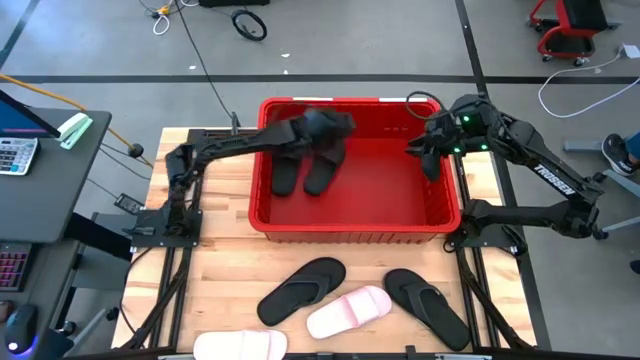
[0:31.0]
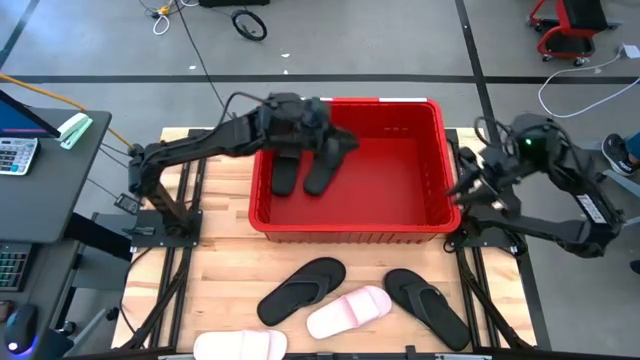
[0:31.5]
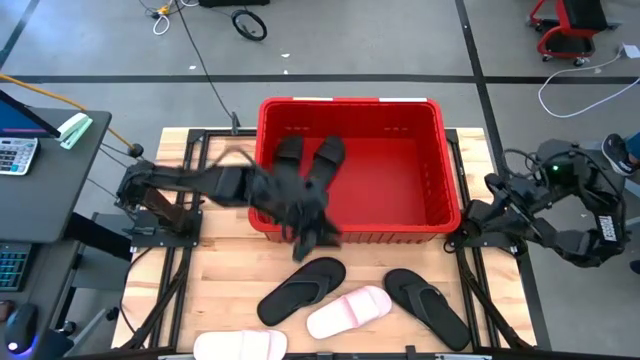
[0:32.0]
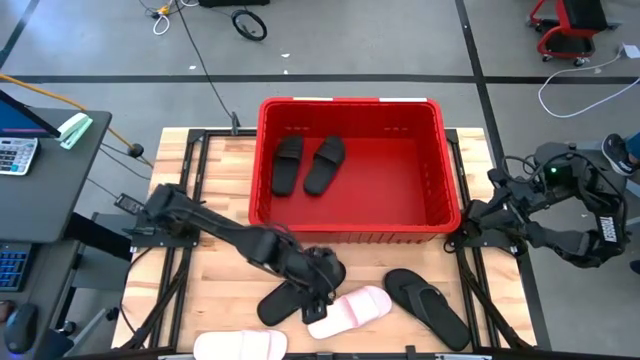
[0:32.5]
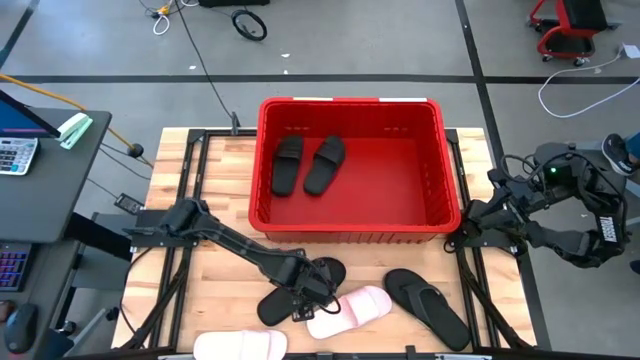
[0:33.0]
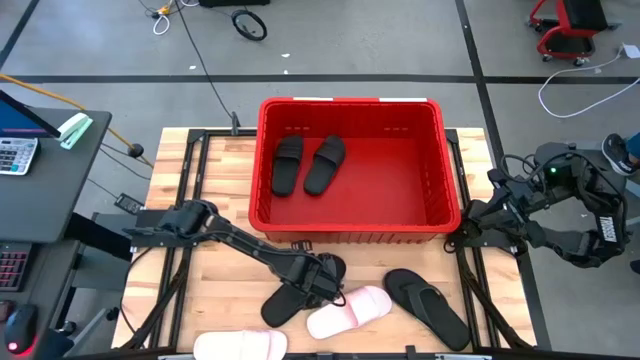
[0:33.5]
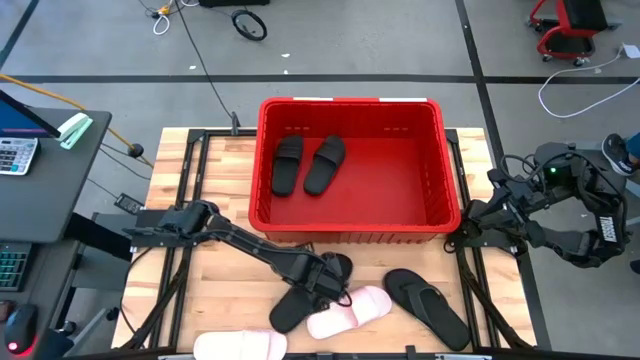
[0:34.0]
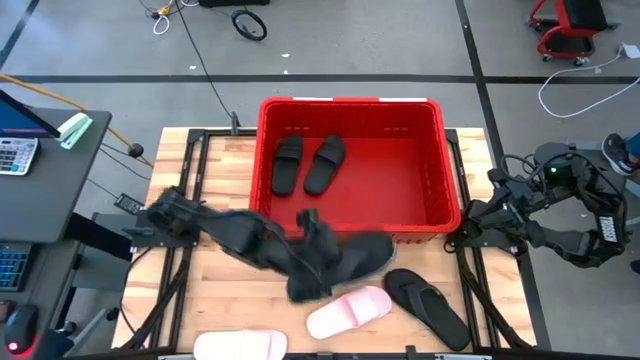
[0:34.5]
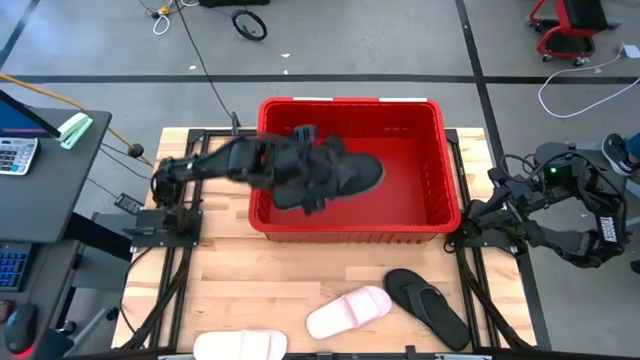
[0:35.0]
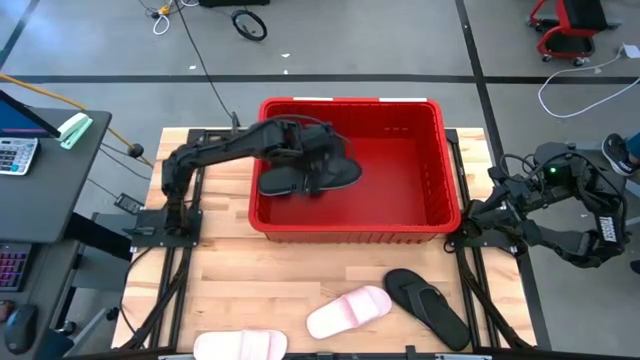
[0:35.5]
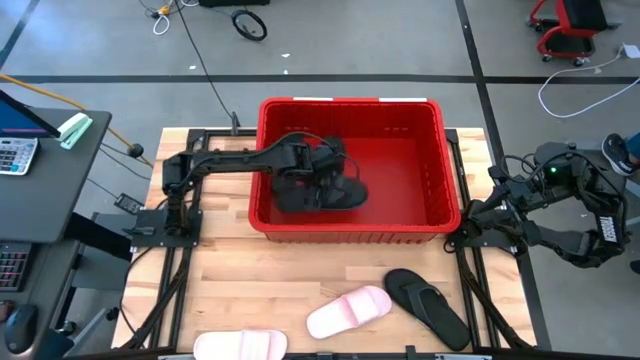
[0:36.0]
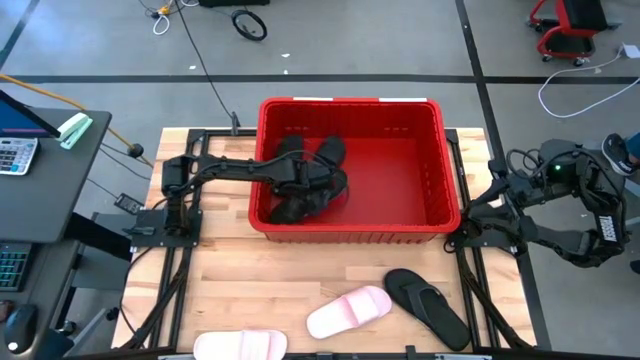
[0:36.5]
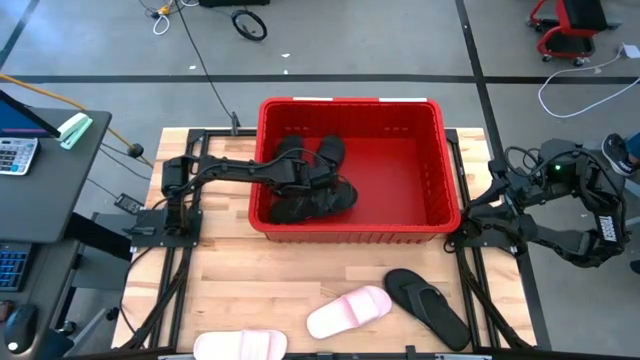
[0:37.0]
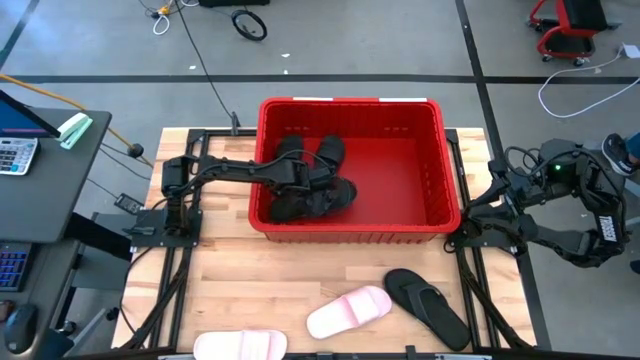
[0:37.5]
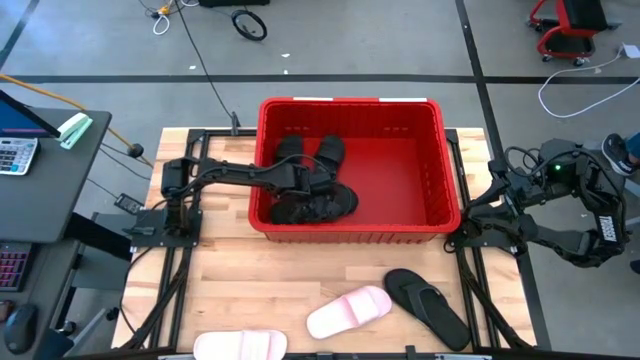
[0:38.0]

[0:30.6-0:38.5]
Task: Pick and place slides into bin
Put the left black slipper into the red bin

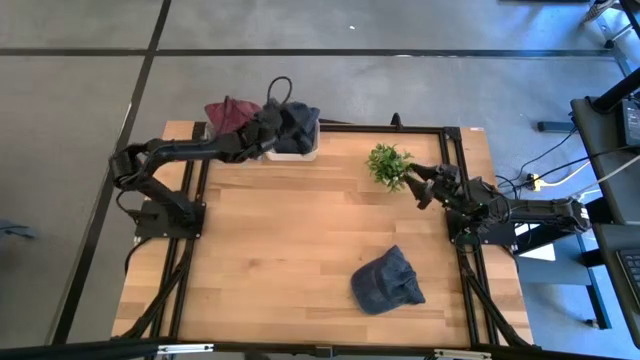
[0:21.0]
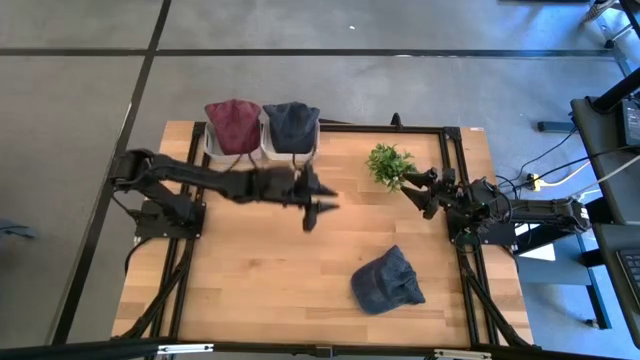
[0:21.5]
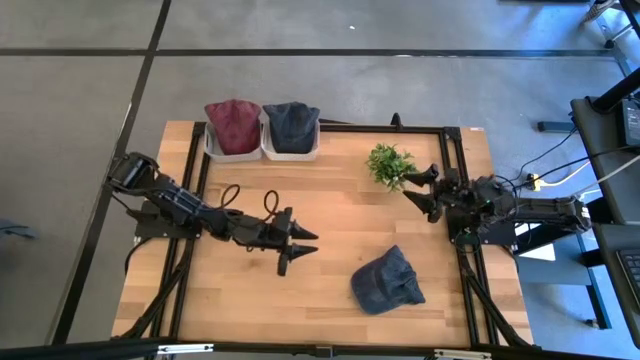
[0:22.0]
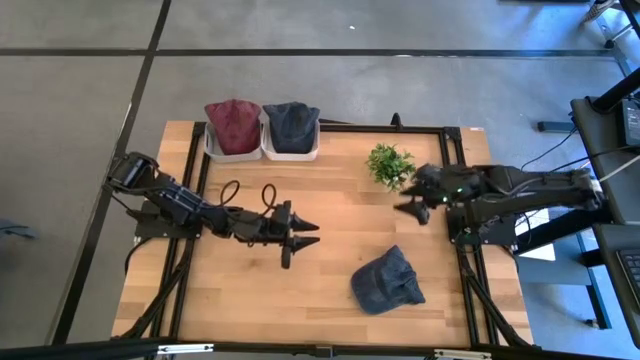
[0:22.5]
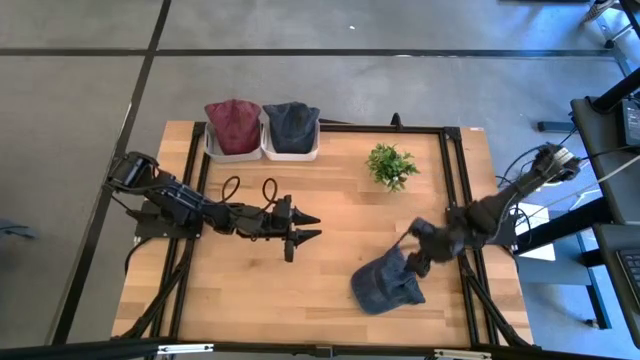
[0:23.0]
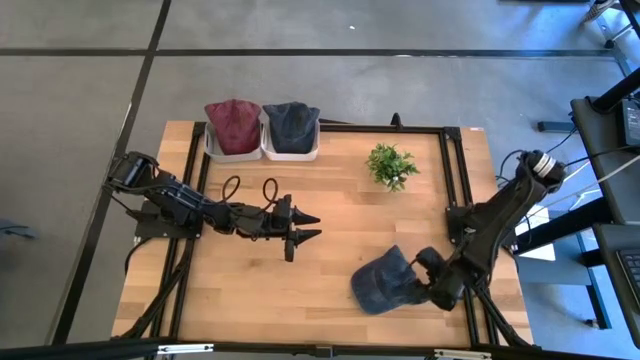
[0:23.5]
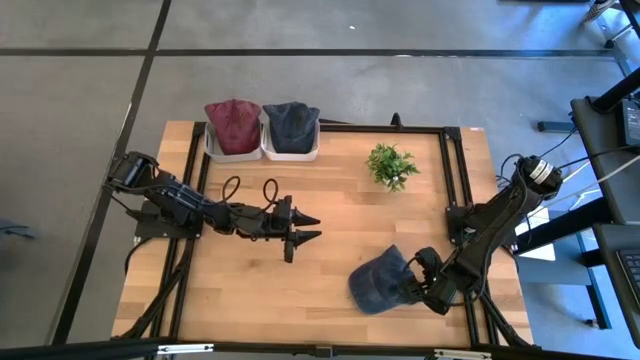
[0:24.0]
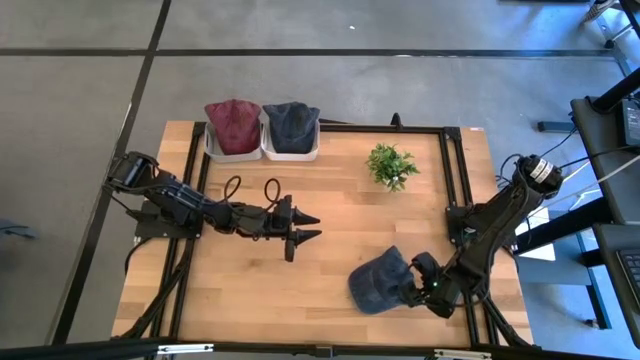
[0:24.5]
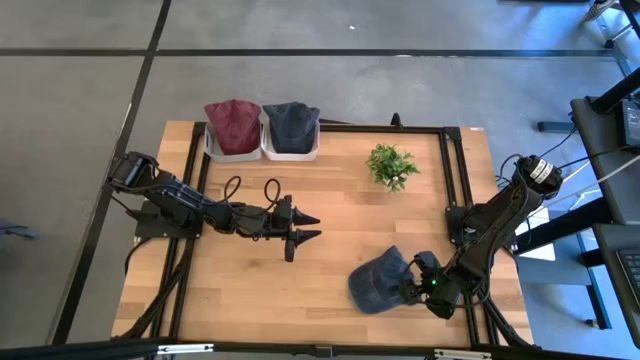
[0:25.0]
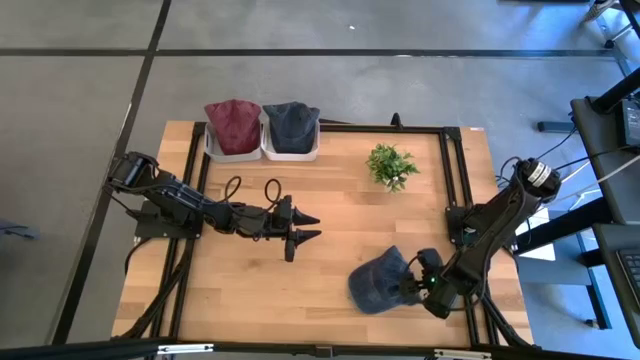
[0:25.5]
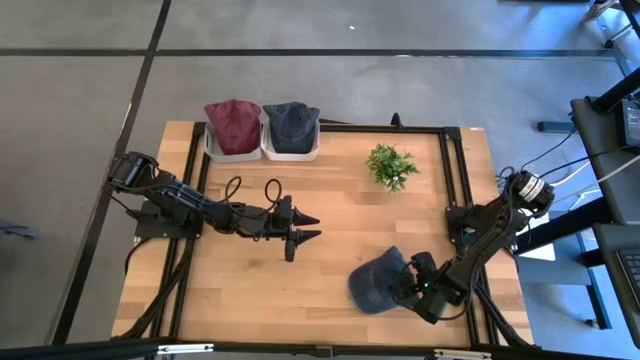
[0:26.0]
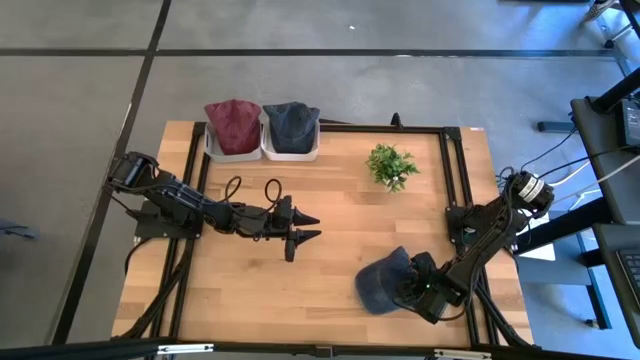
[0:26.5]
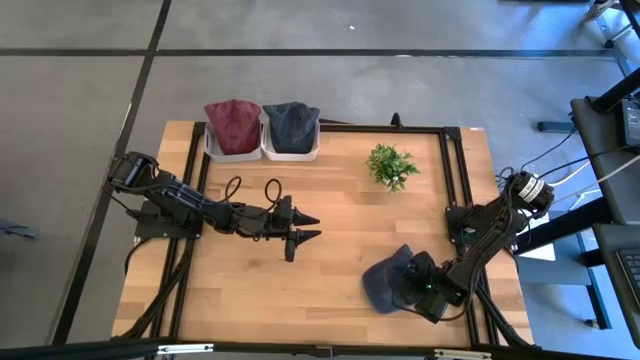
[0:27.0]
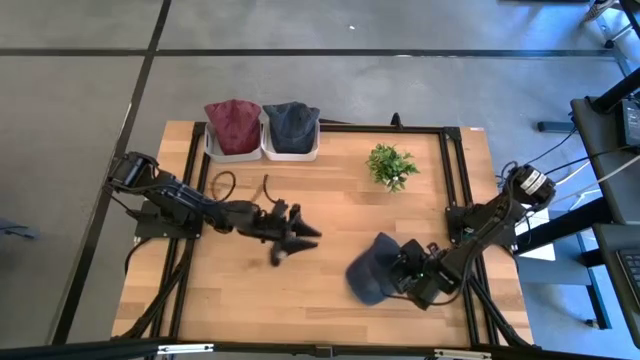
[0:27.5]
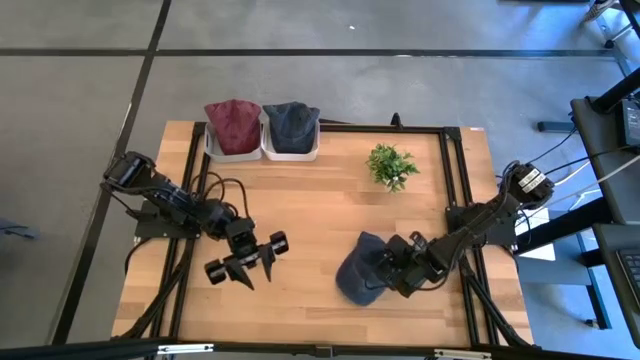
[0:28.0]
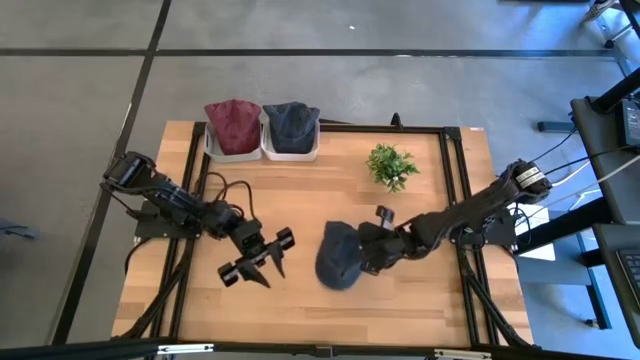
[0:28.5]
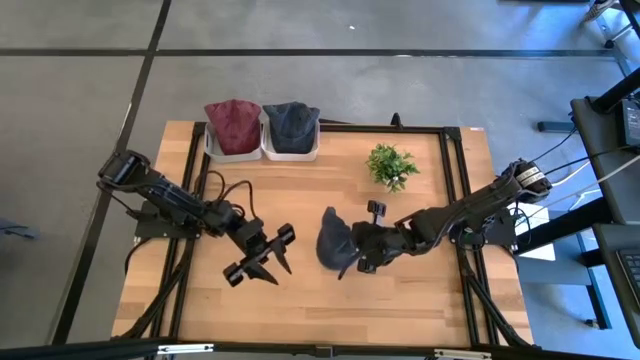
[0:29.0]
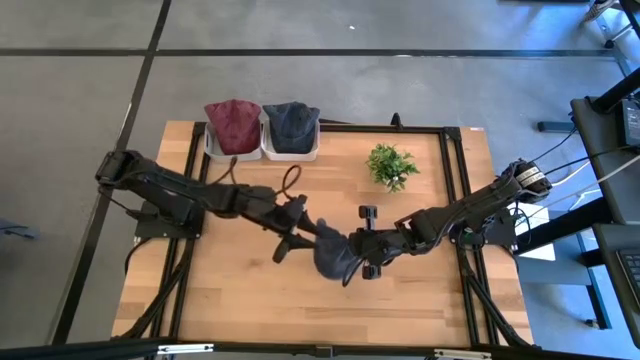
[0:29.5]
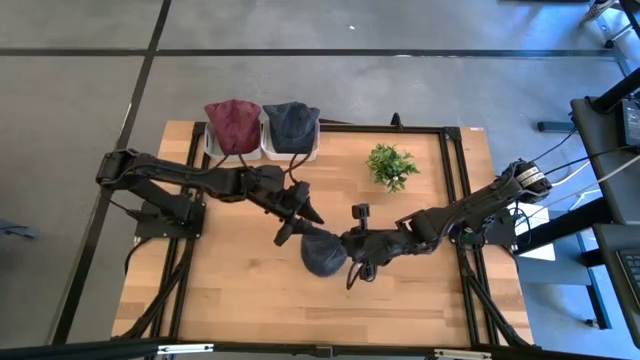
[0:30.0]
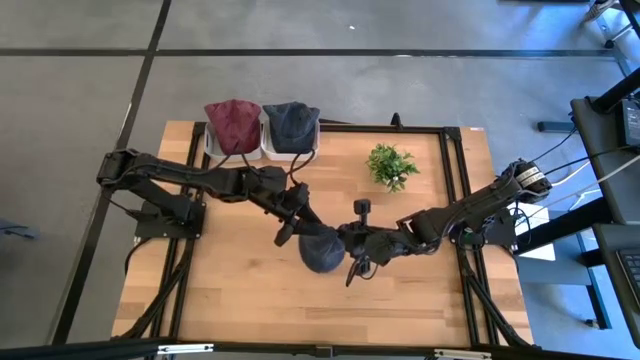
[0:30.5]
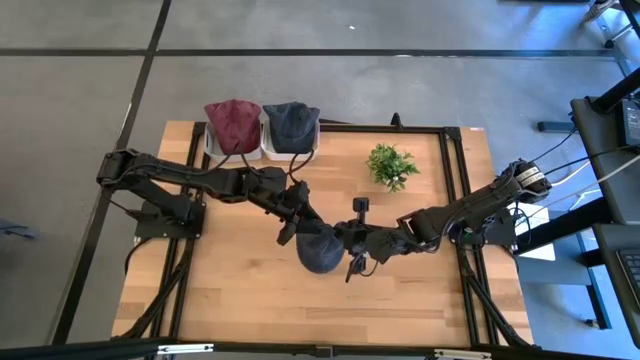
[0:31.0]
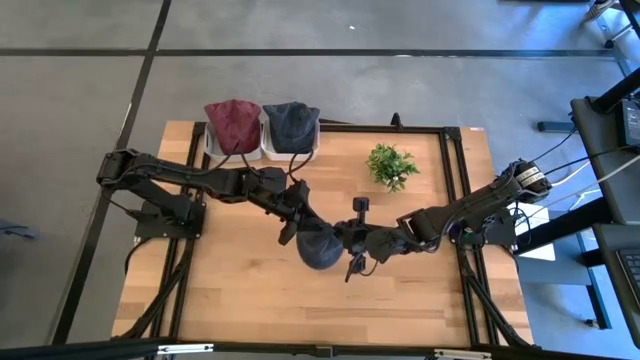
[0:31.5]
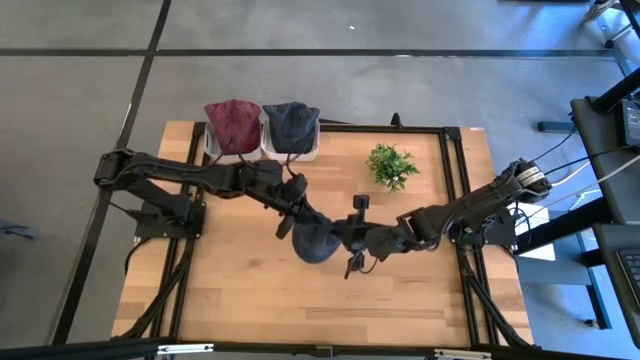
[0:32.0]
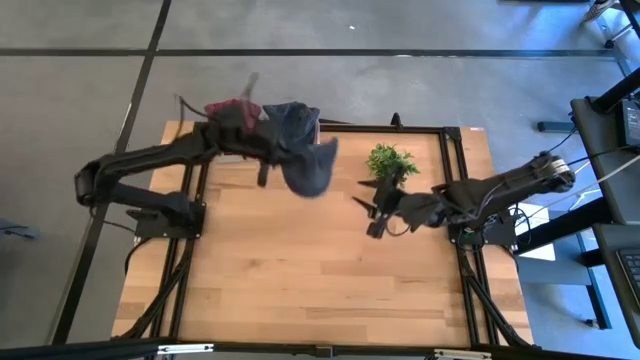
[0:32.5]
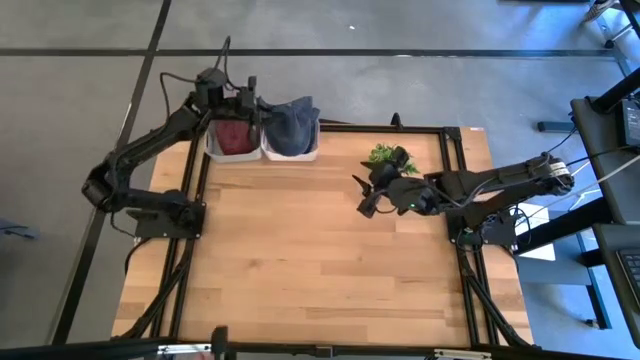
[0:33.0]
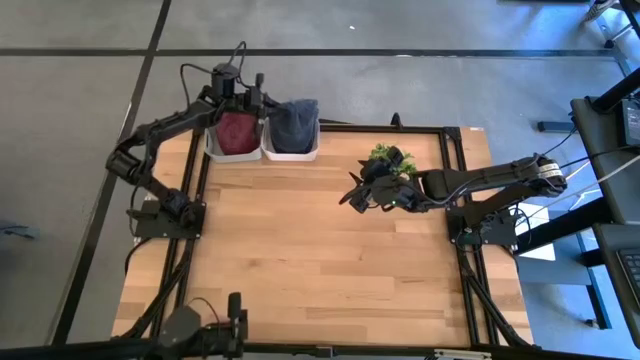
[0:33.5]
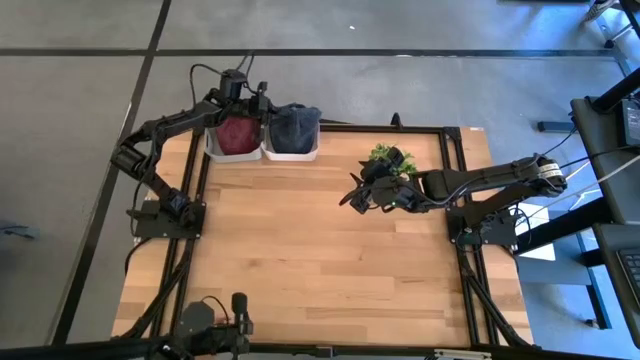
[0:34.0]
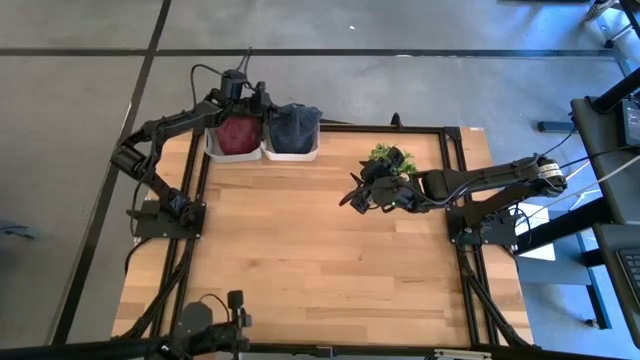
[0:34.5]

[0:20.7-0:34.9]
Task: Pick & Place hat
Put the black cap into the white bin
